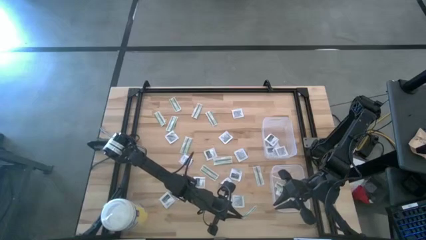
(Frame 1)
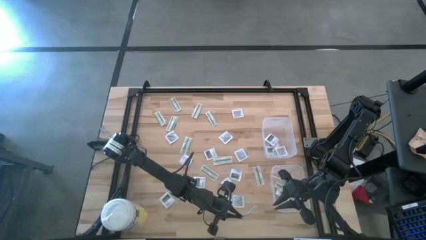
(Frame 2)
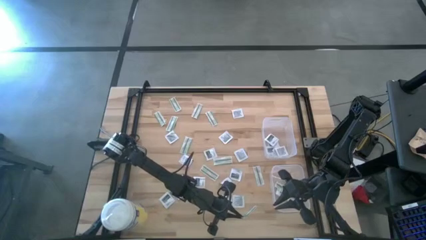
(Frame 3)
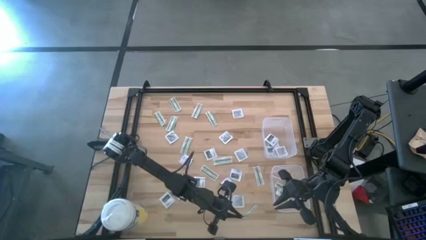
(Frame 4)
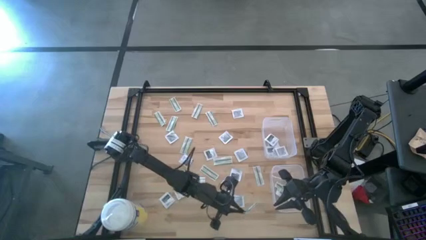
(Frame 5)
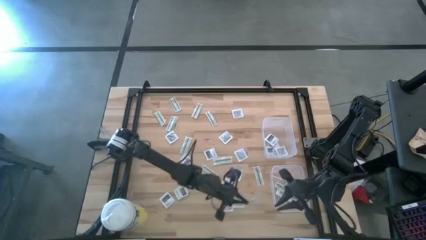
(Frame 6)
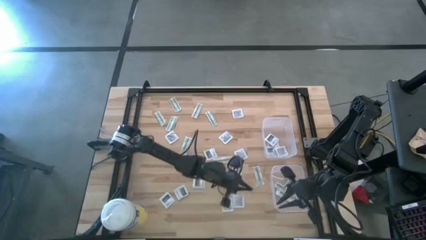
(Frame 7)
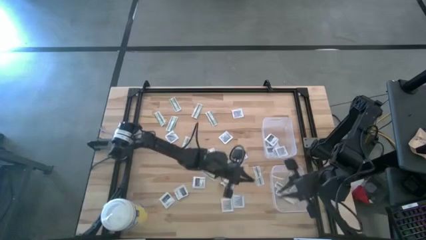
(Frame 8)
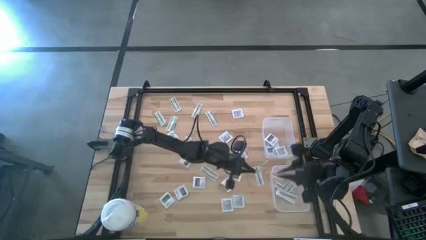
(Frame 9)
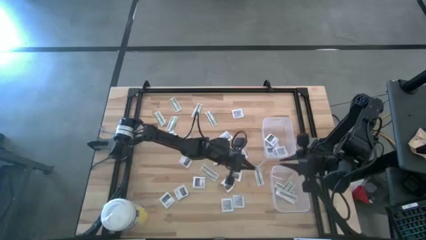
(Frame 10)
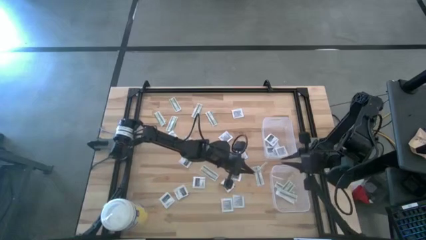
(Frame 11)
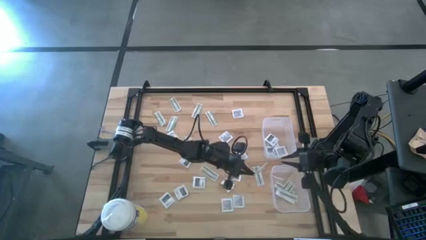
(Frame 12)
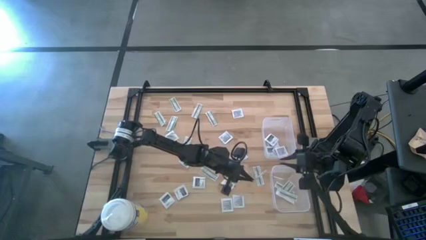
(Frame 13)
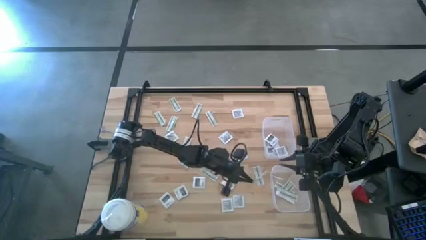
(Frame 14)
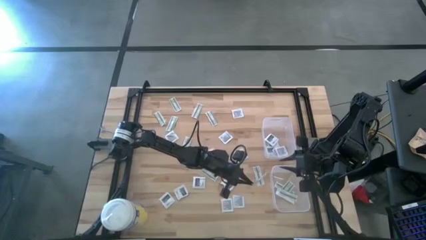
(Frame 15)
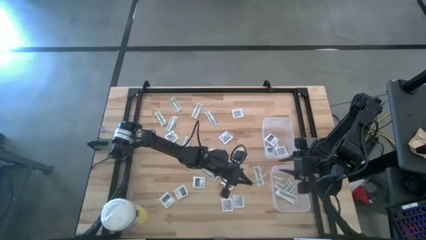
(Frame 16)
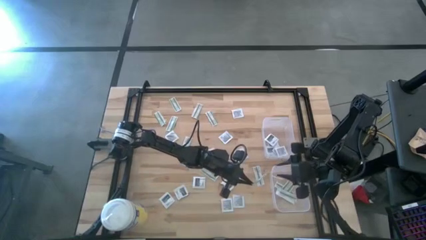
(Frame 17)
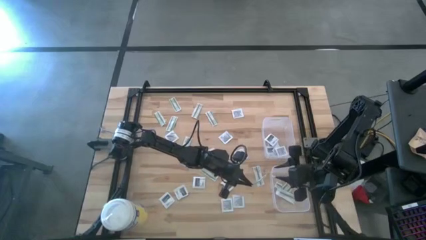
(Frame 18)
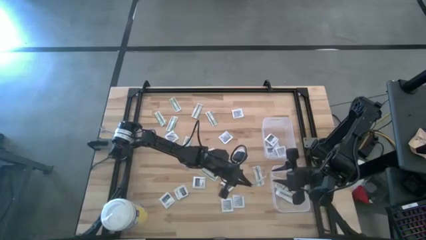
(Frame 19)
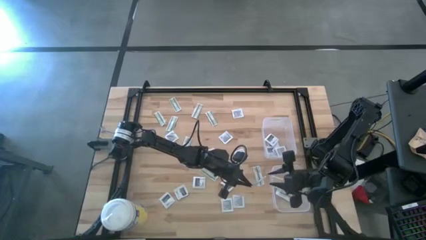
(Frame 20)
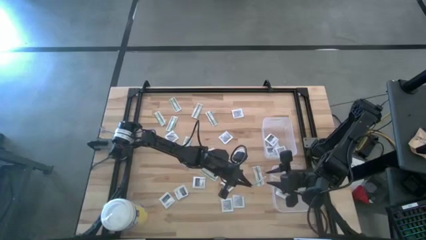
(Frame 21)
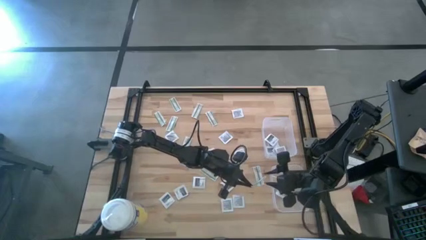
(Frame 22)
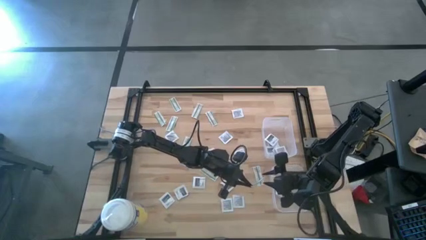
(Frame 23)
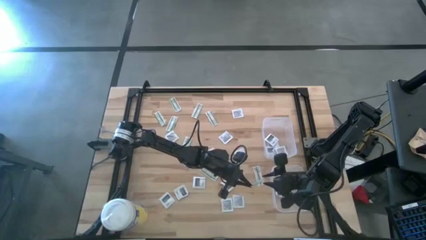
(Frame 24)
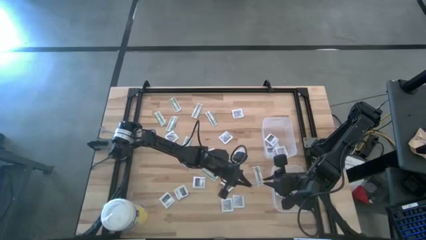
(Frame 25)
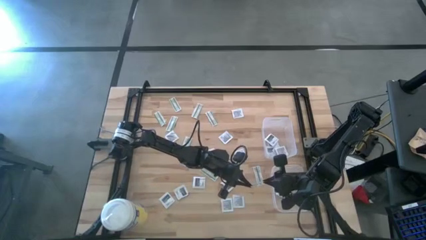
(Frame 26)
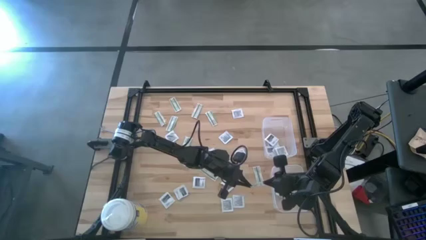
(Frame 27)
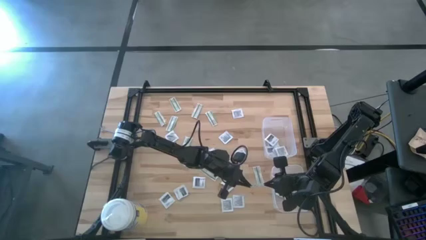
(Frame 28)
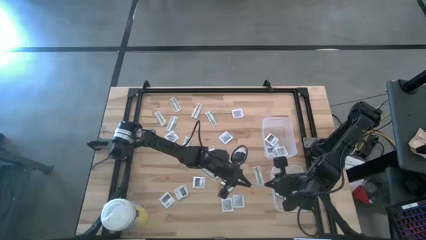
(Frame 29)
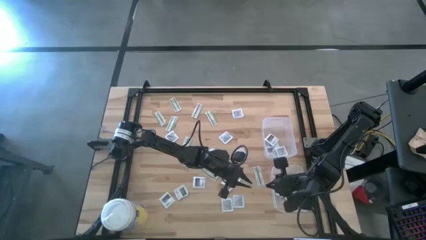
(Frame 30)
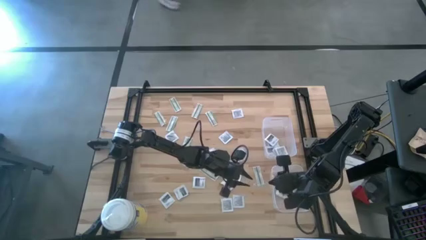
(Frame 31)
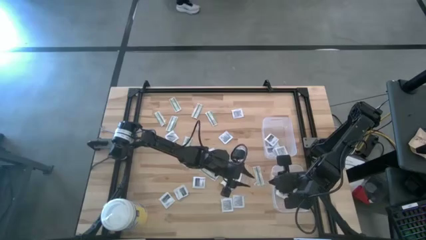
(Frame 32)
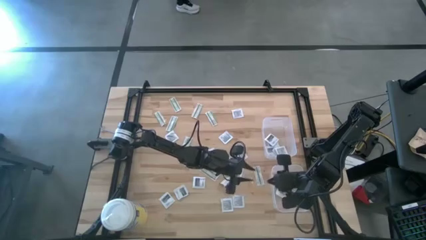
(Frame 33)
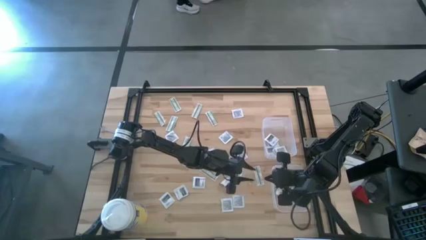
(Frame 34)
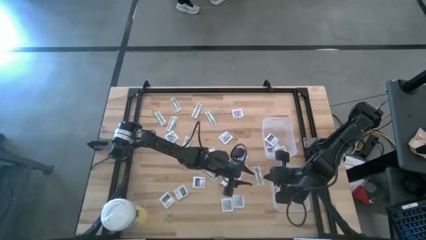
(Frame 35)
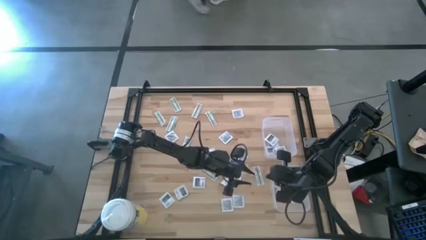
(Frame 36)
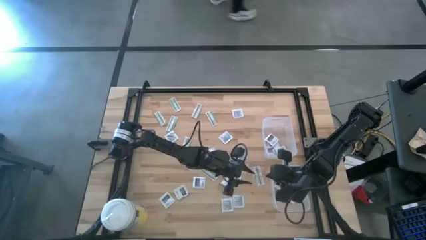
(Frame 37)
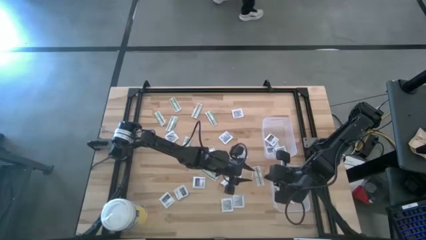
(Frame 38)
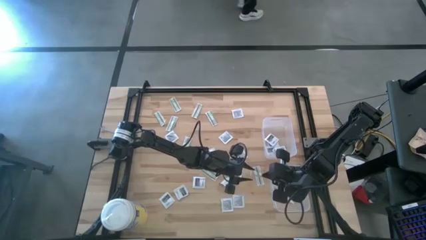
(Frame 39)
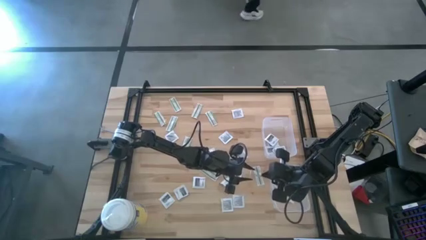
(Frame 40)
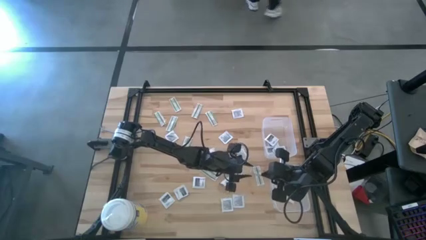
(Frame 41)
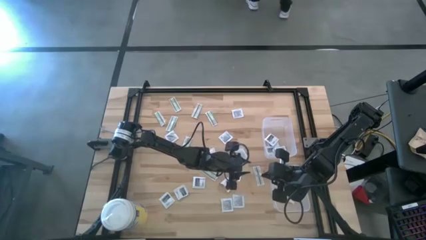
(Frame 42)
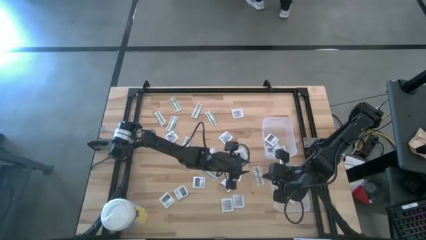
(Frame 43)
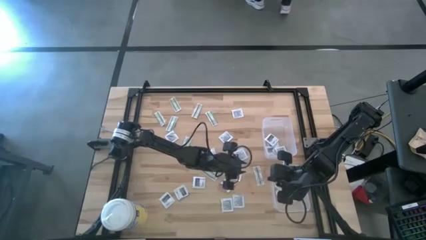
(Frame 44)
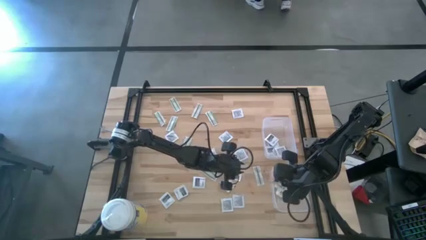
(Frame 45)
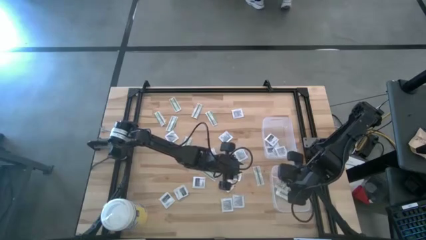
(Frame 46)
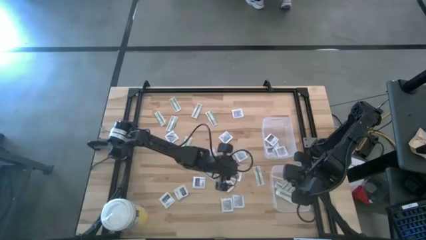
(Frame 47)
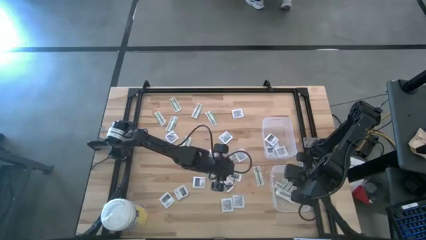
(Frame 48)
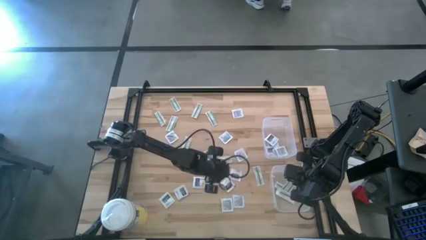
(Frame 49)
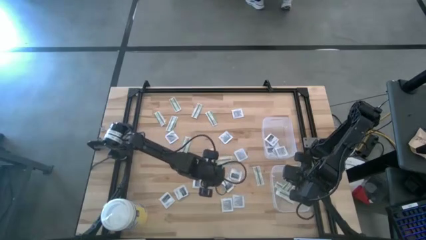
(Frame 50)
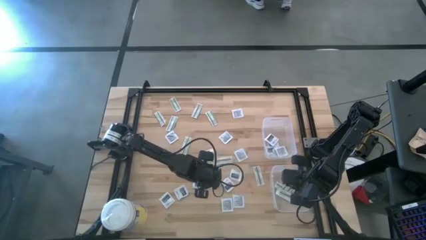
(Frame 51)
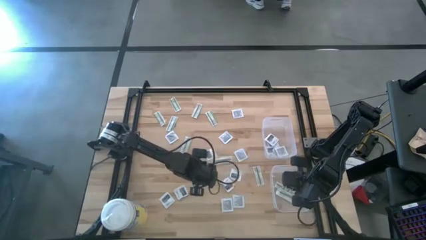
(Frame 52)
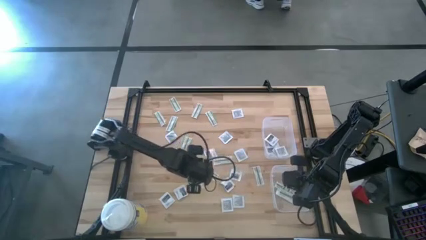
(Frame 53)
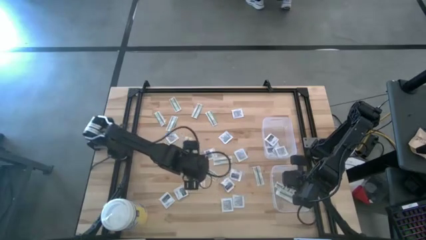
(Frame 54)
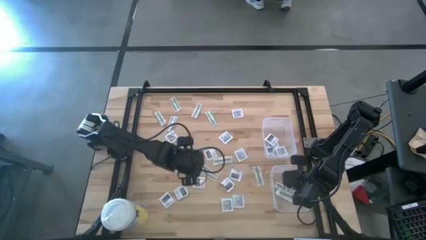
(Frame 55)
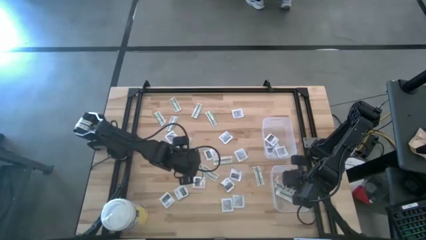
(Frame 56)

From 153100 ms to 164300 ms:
Task: Pick & Place First Aid Supplies
Put the bandage pack into the bottom bin

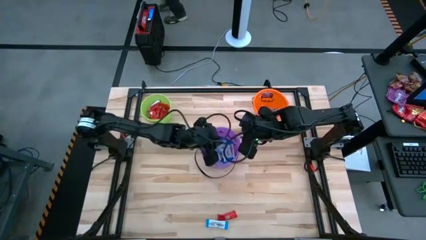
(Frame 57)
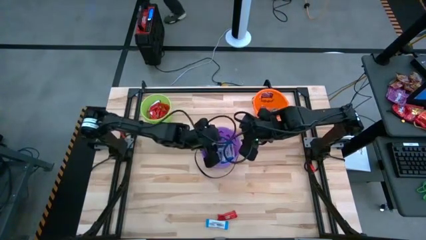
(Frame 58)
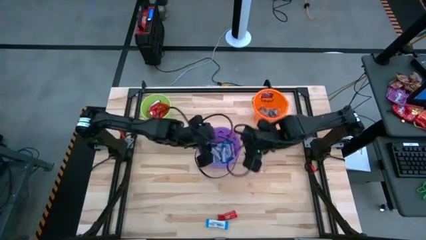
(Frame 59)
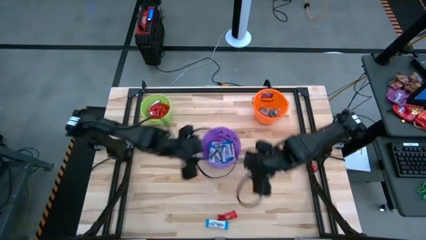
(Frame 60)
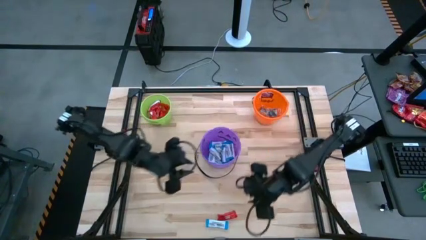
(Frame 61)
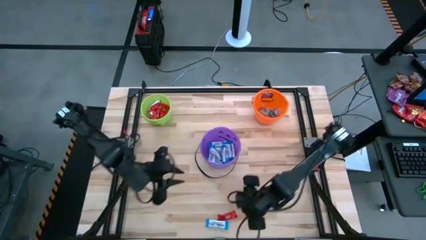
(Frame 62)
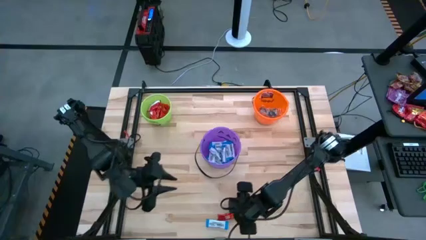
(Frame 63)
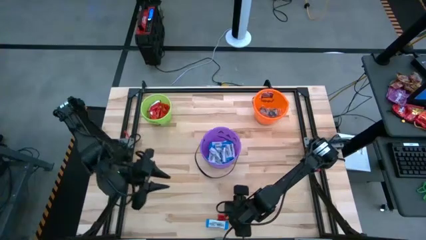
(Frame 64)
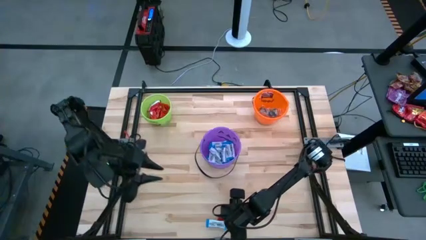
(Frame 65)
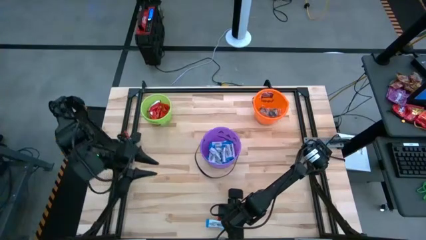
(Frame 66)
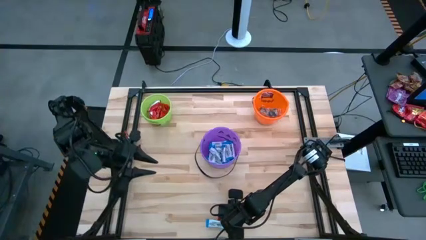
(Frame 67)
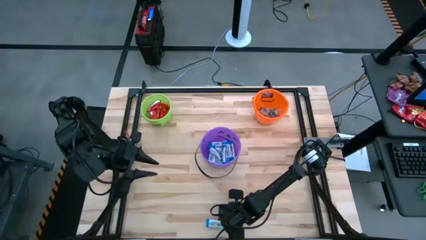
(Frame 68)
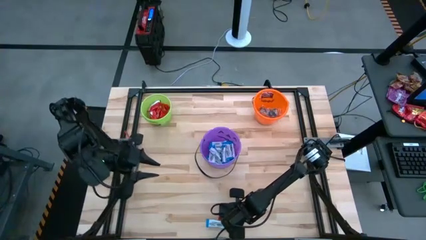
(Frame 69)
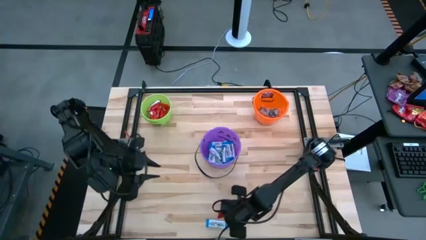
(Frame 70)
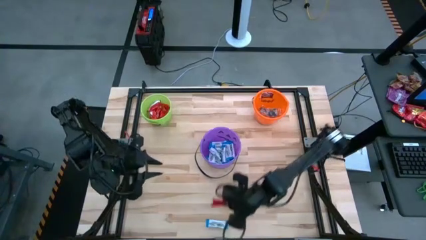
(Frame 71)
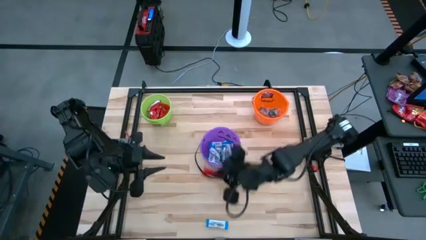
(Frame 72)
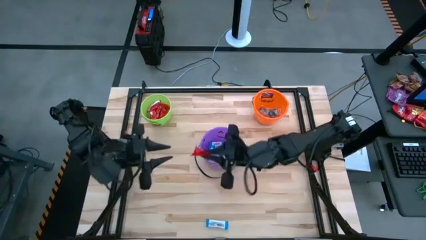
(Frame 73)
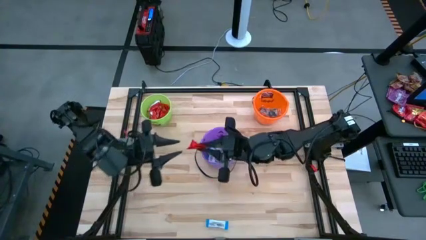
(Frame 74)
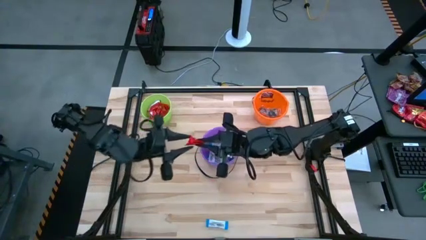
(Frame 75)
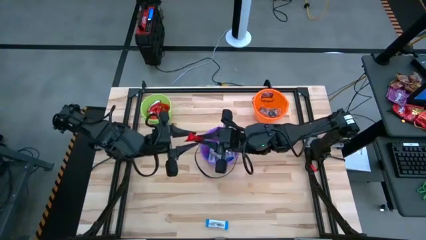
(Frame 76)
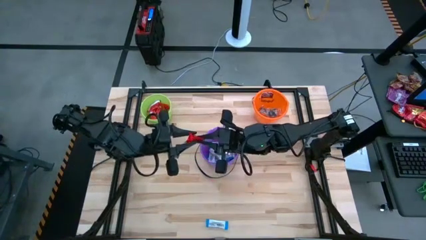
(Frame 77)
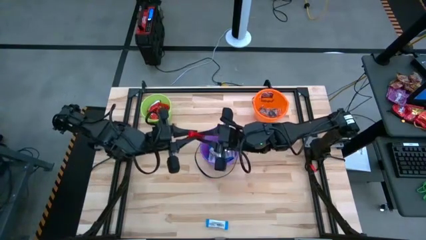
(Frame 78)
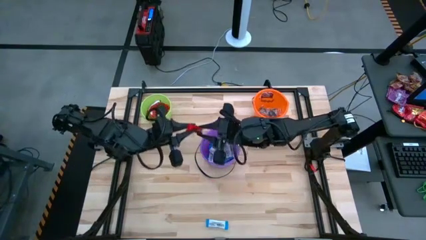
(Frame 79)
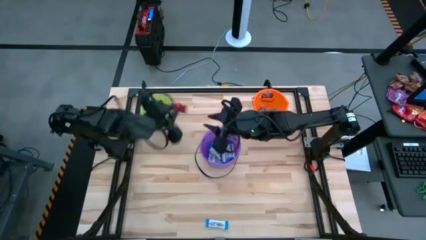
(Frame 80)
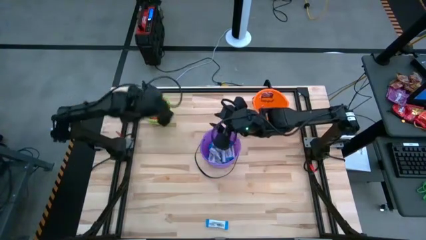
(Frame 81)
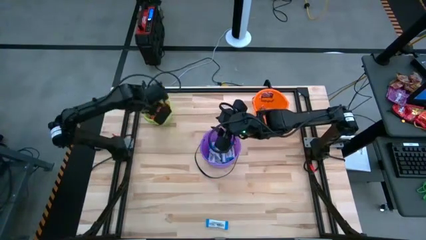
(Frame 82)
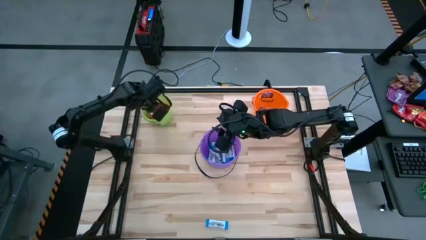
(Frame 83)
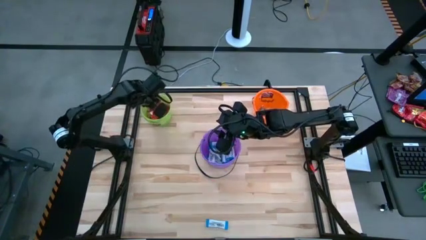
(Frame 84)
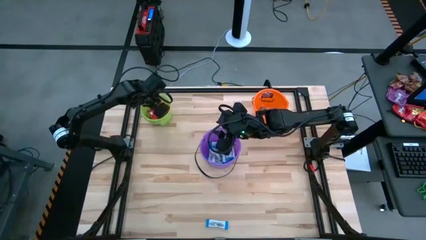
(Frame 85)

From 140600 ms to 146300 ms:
Task: Sort candy by brand, put in halloween buckets
Put the red chocolate into the green bucket
